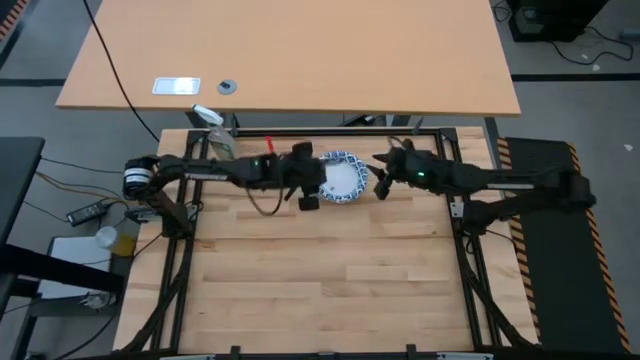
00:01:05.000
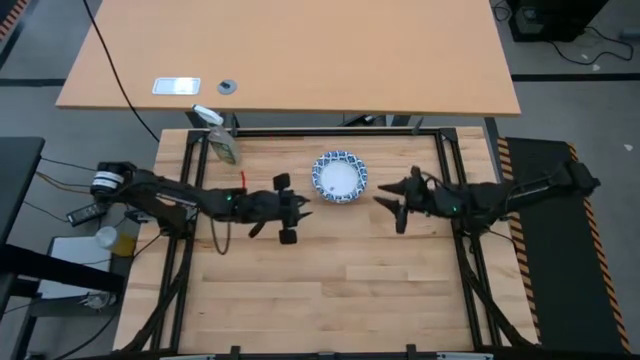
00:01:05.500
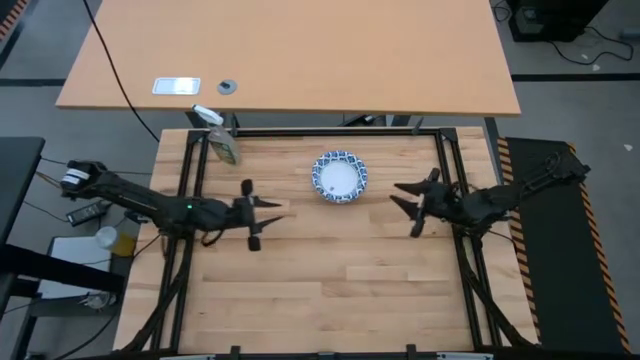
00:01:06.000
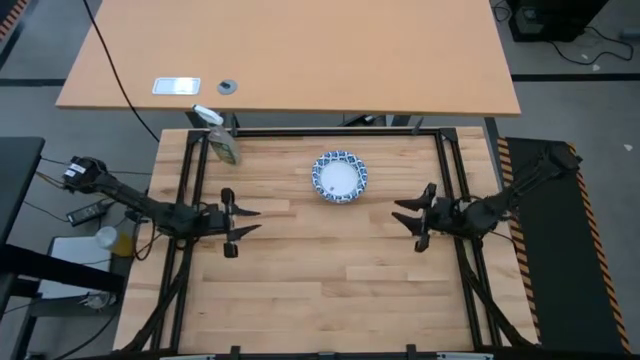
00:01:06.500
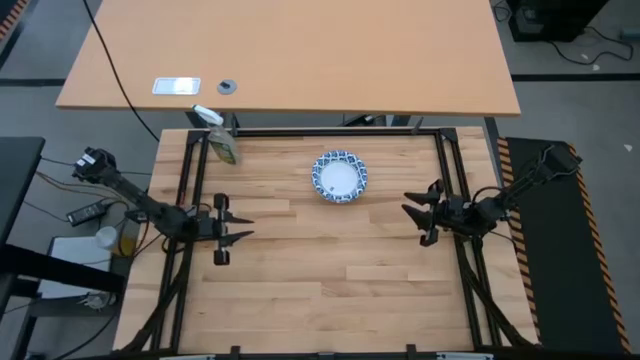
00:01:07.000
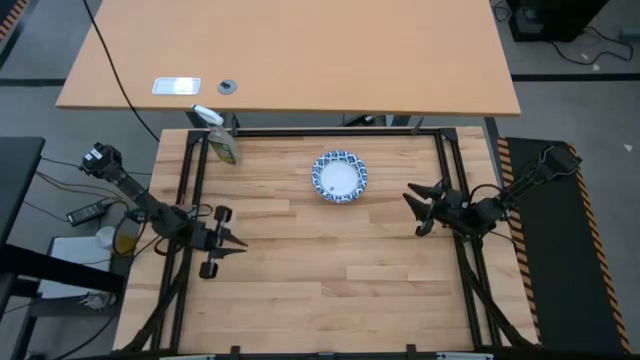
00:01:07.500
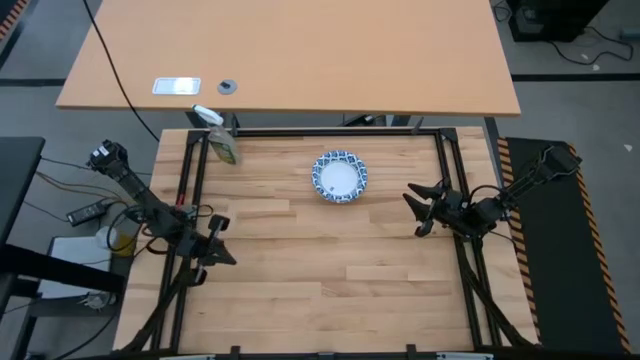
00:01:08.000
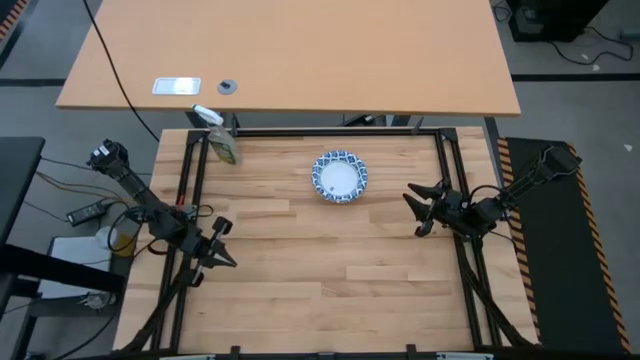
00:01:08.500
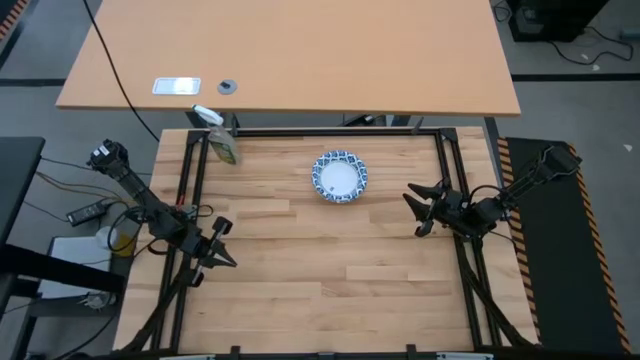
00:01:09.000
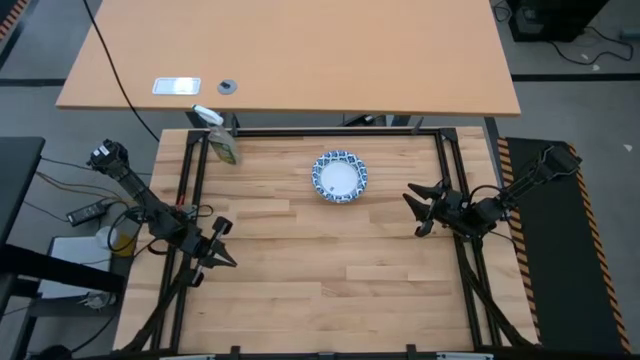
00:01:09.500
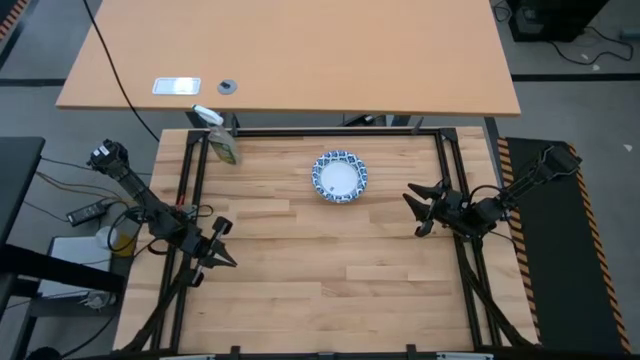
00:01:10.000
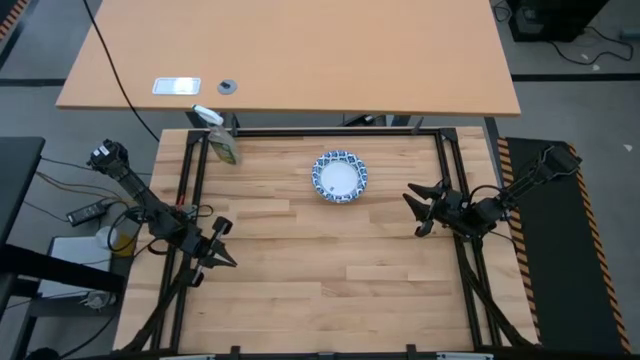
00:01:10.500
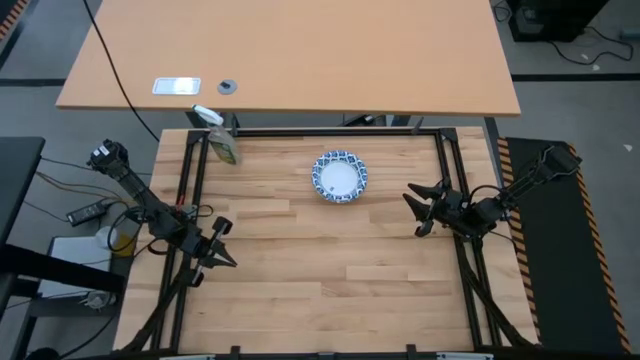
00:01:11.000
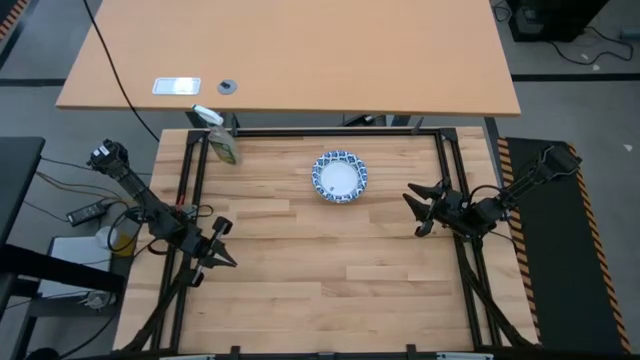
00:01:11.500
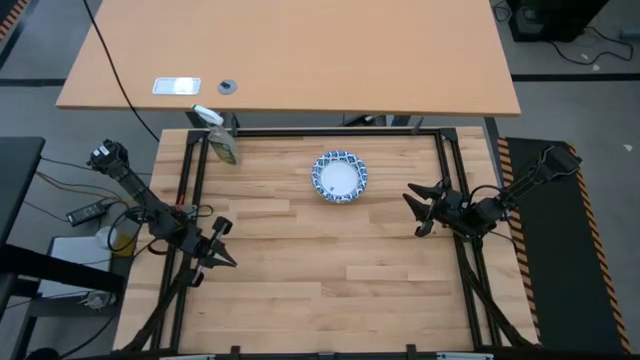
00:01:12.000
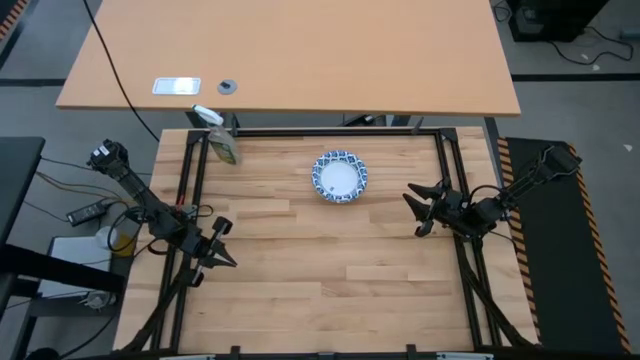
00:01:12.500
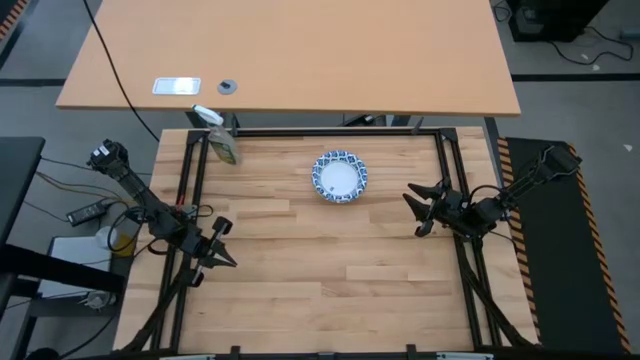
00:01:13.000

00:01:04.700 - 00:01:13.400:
Return to Home Position
